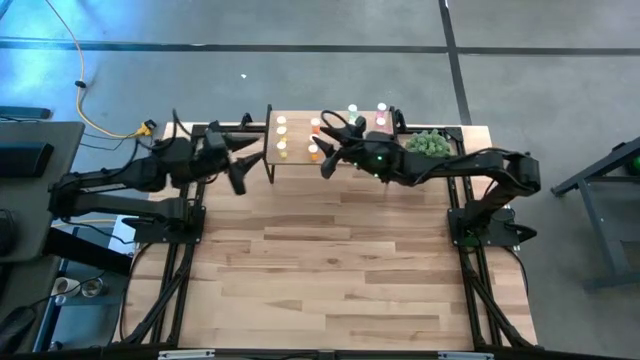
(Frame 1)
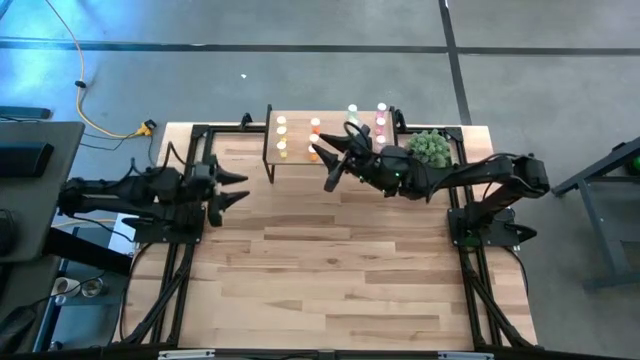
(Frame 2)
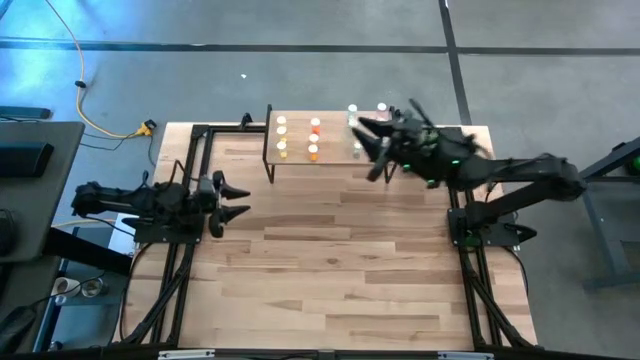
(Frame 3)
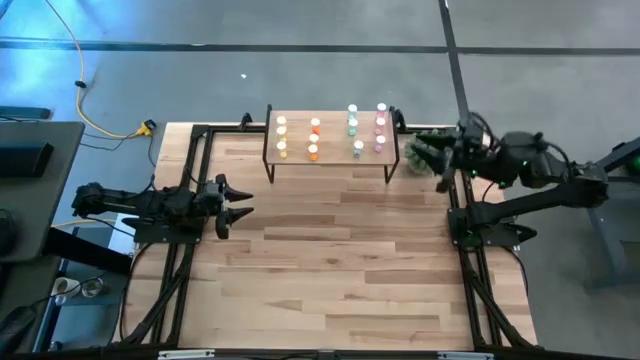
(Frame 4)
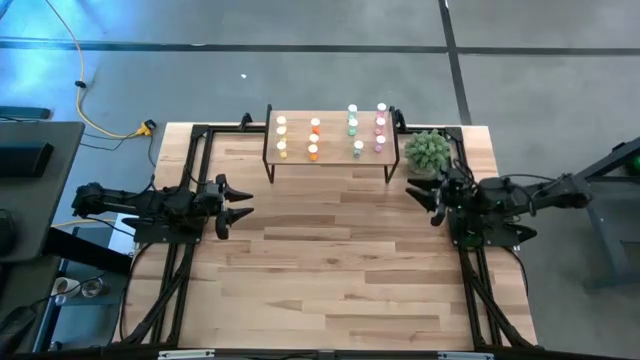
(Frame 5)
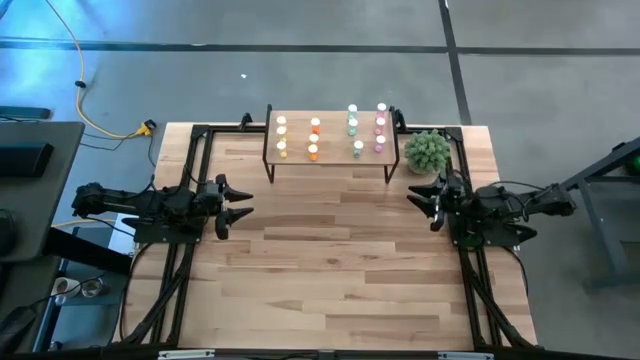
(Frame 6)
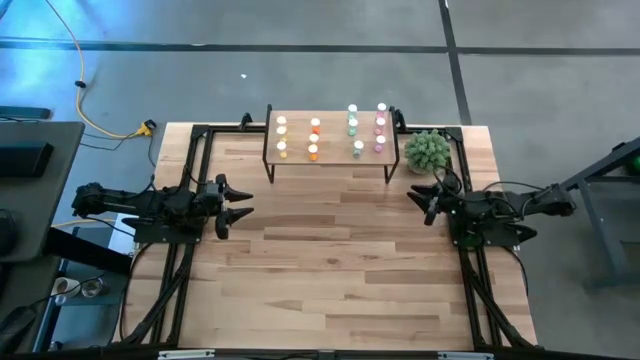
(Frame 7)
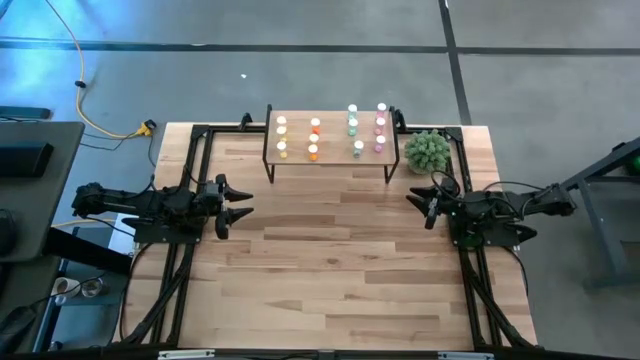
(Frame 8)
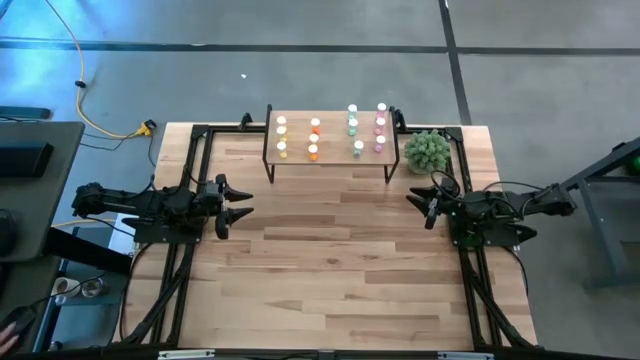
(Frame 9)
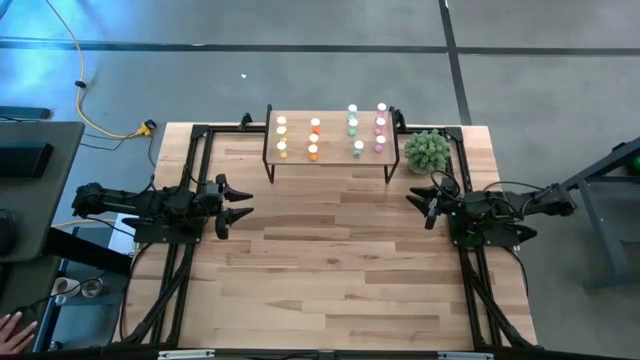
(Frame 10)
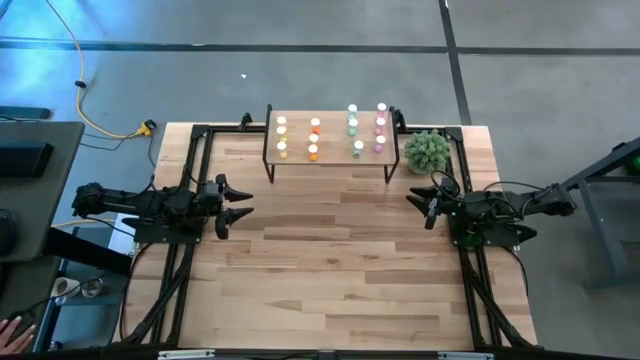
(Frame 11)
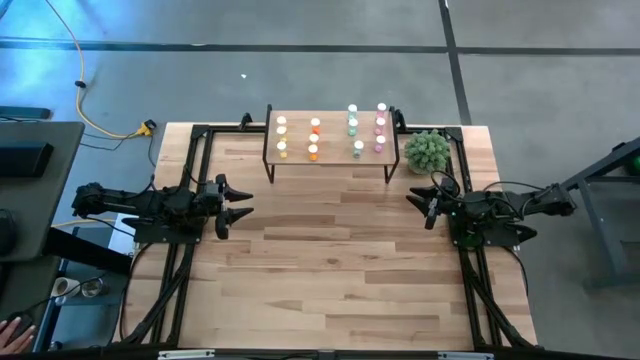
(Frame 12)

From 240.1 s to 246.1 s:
Task: Pick and place medicine bottles onto shelf by color
Return to Home Position

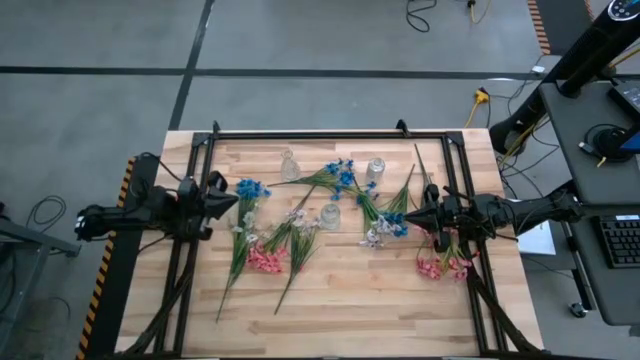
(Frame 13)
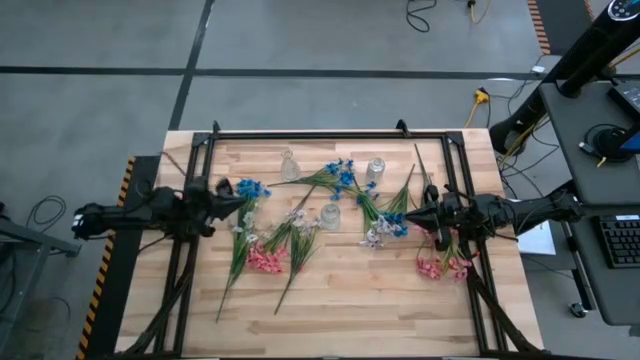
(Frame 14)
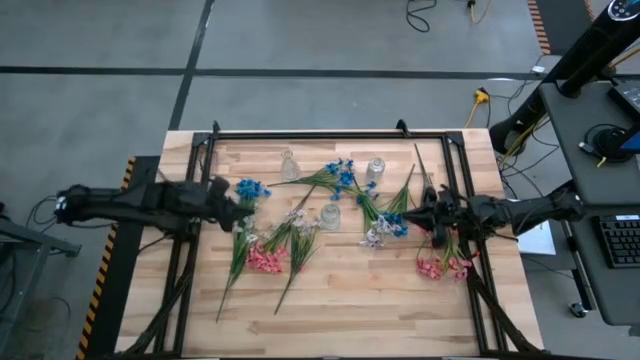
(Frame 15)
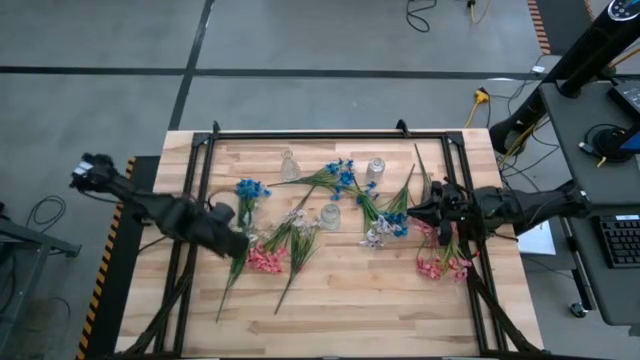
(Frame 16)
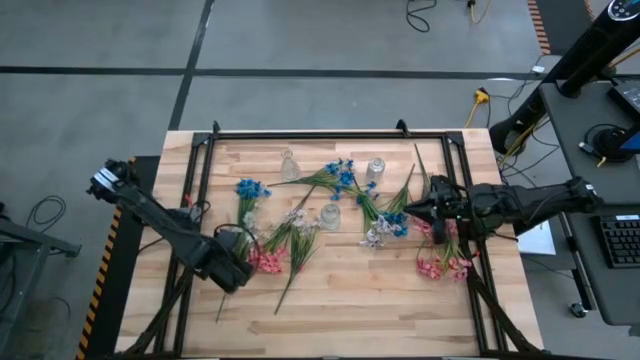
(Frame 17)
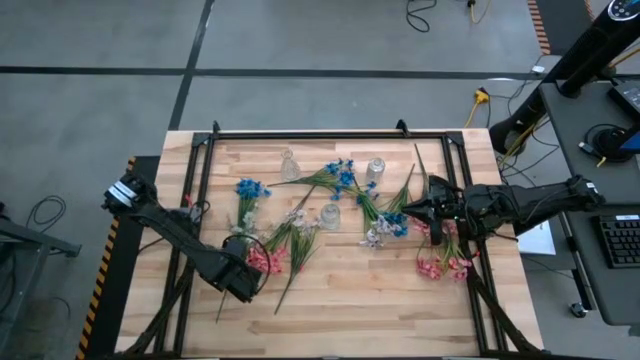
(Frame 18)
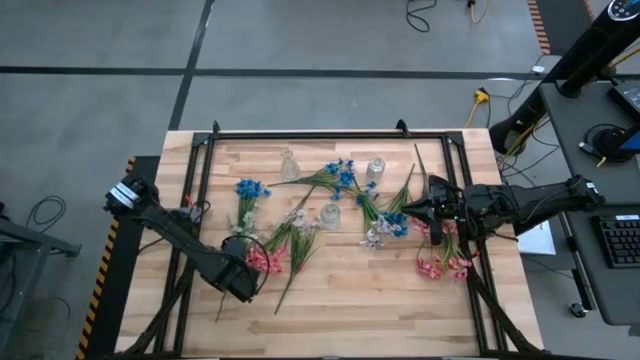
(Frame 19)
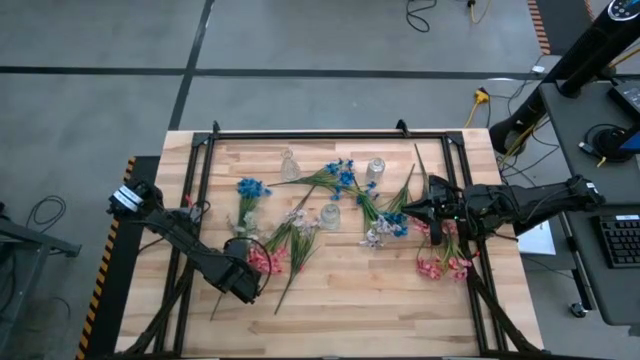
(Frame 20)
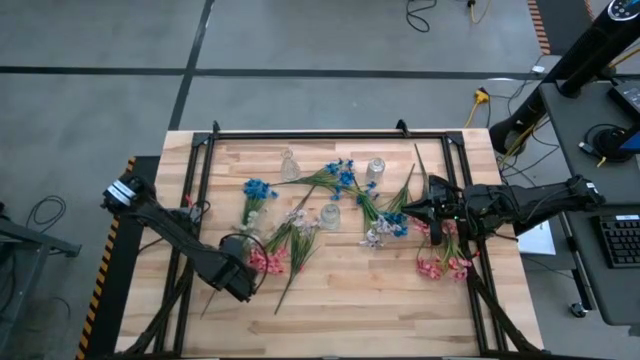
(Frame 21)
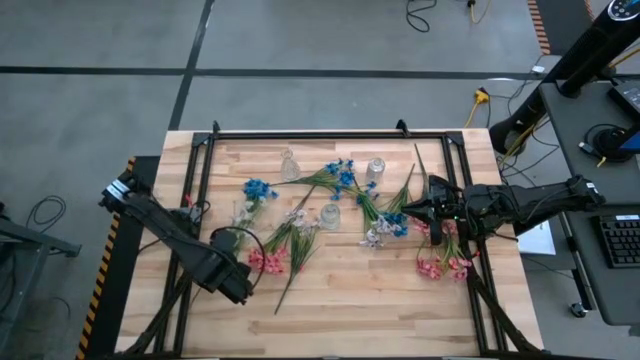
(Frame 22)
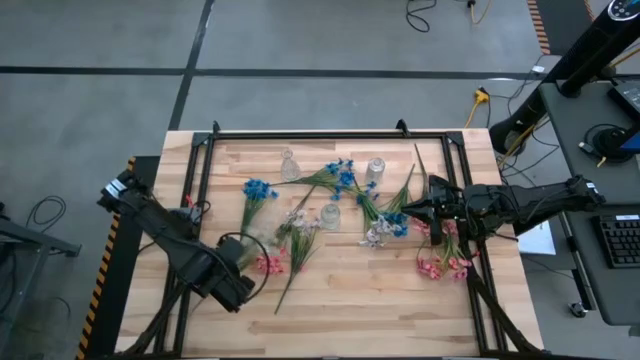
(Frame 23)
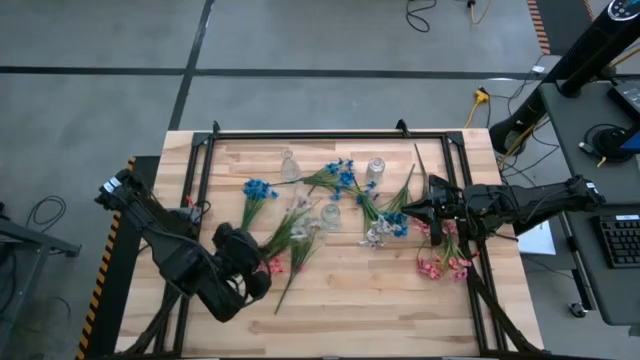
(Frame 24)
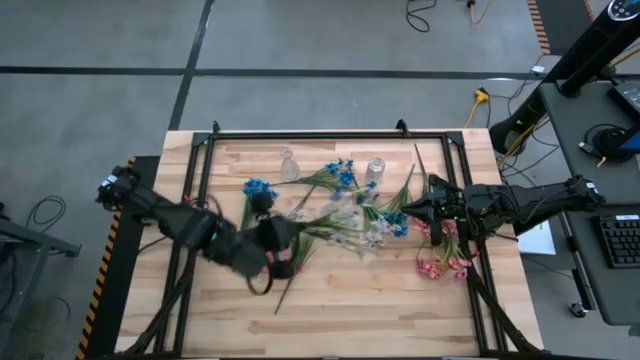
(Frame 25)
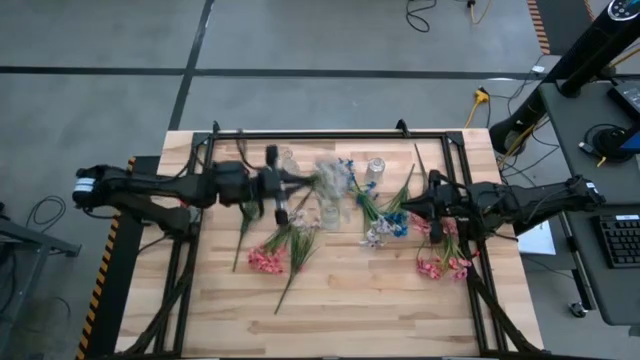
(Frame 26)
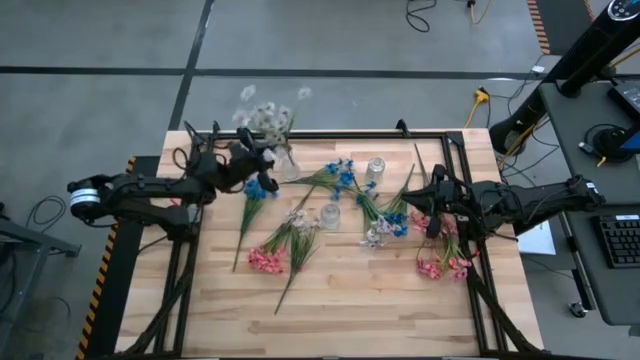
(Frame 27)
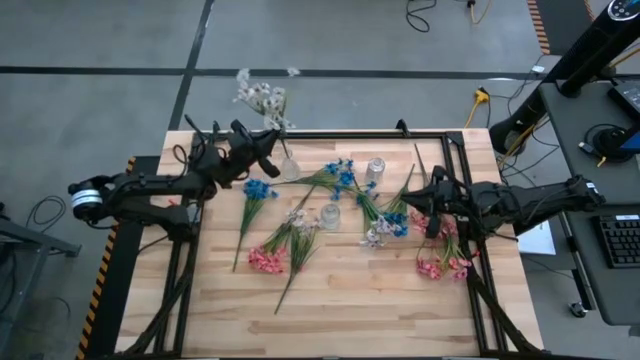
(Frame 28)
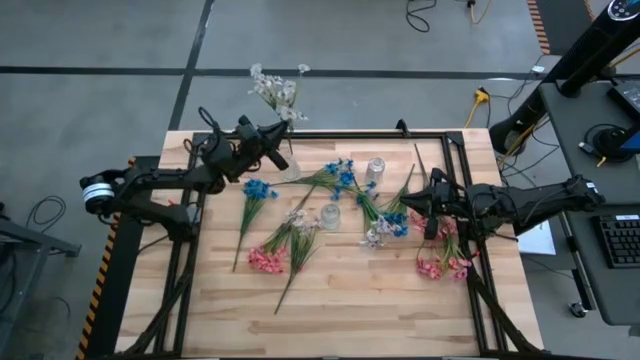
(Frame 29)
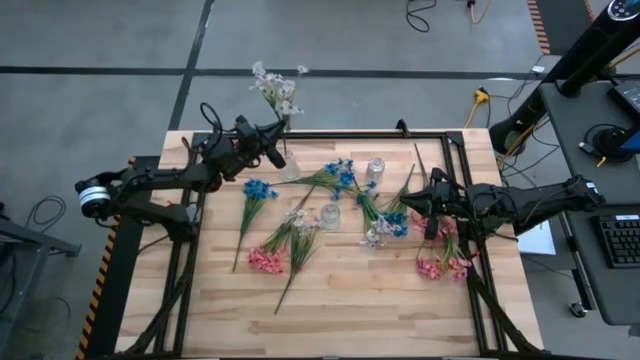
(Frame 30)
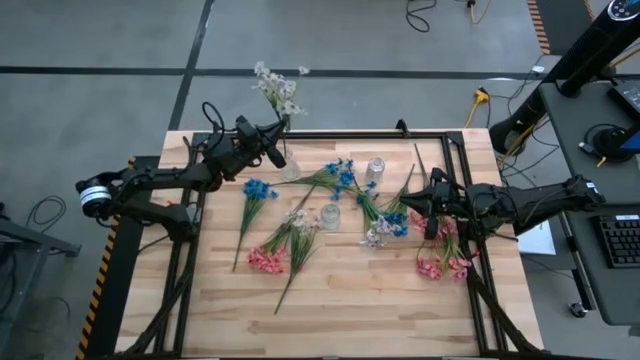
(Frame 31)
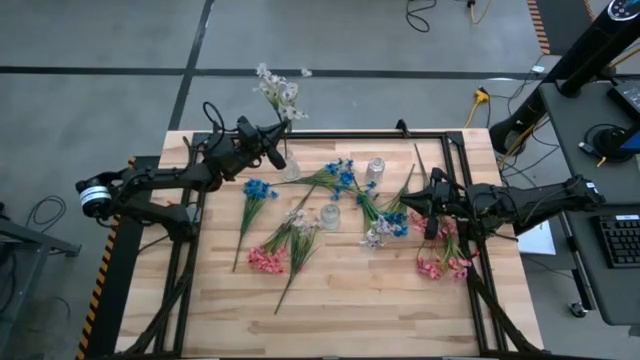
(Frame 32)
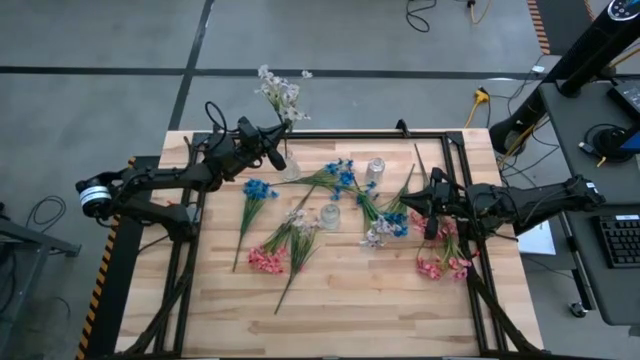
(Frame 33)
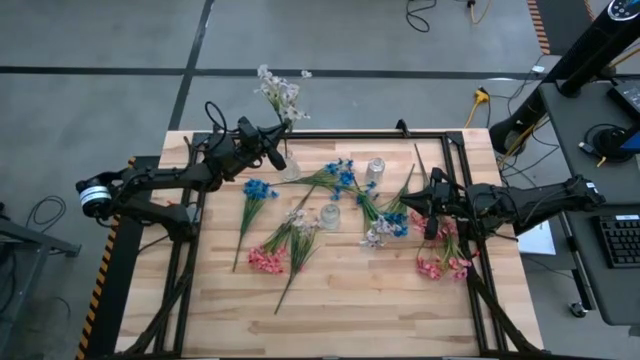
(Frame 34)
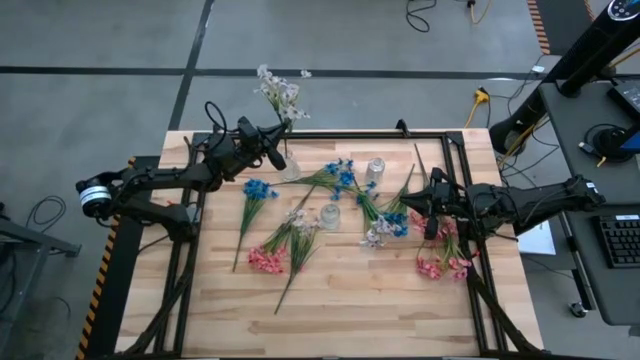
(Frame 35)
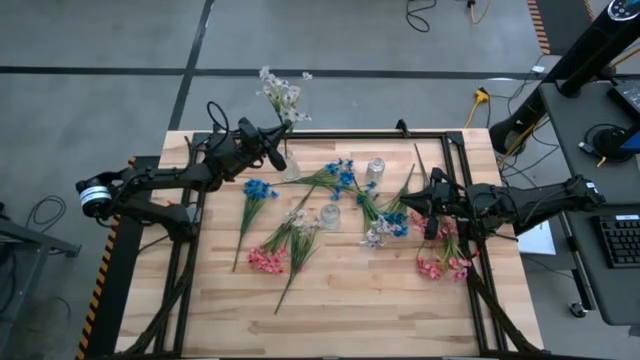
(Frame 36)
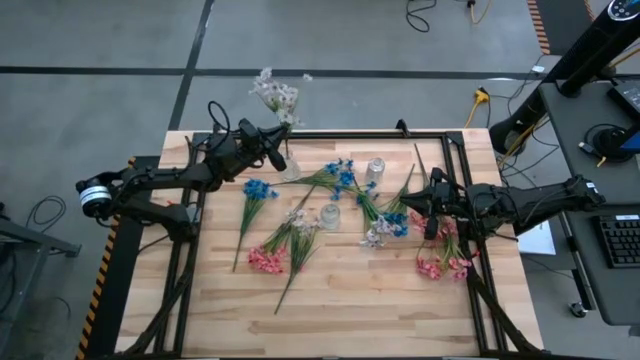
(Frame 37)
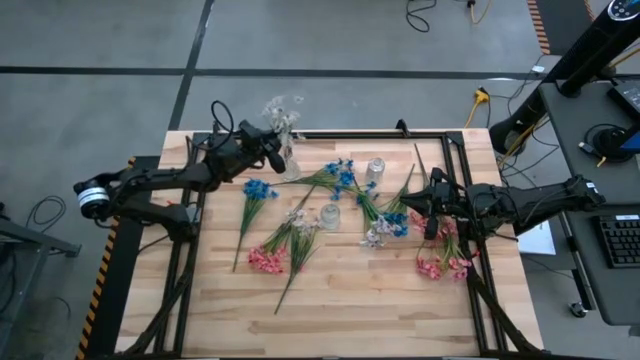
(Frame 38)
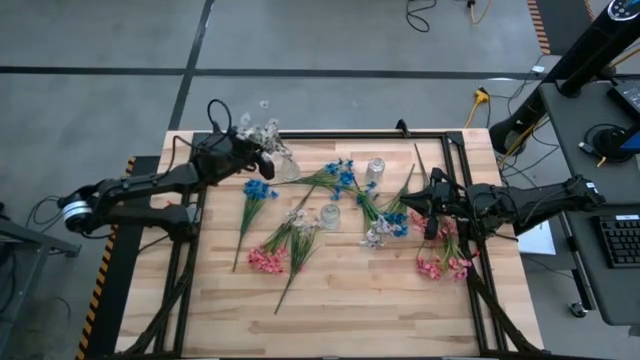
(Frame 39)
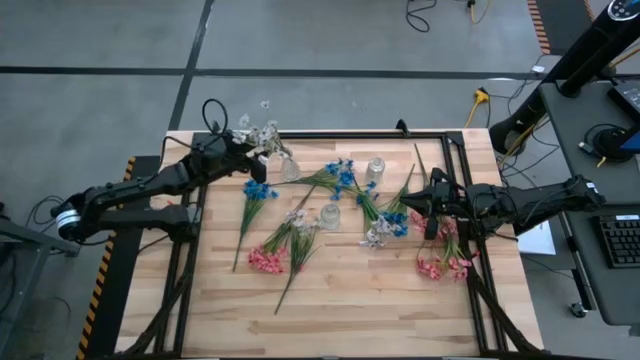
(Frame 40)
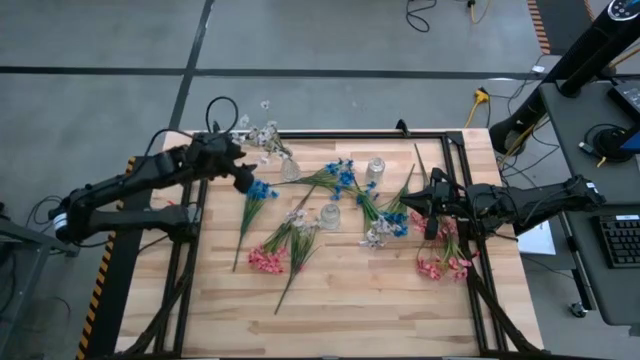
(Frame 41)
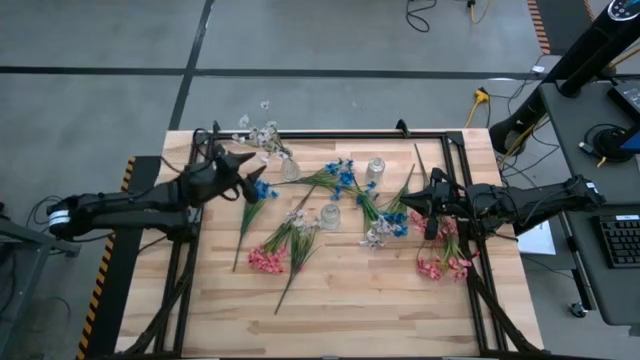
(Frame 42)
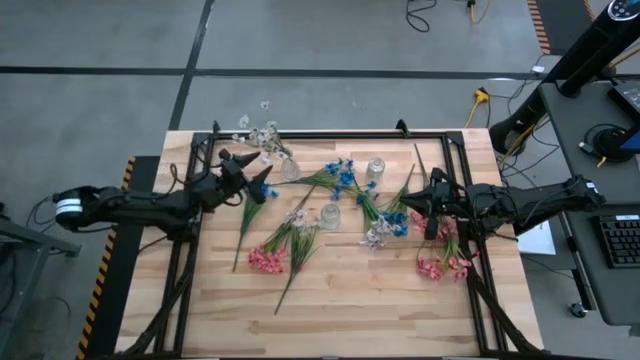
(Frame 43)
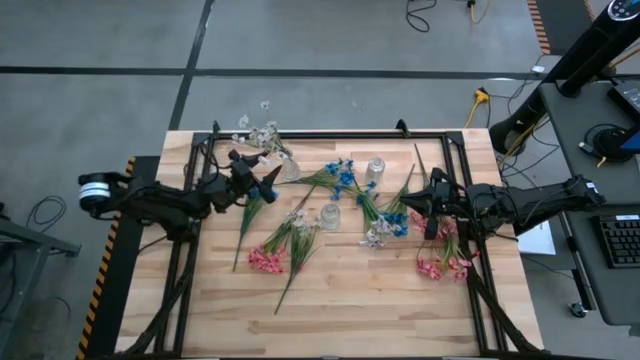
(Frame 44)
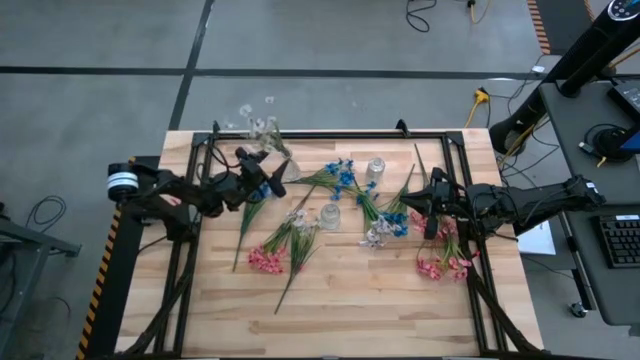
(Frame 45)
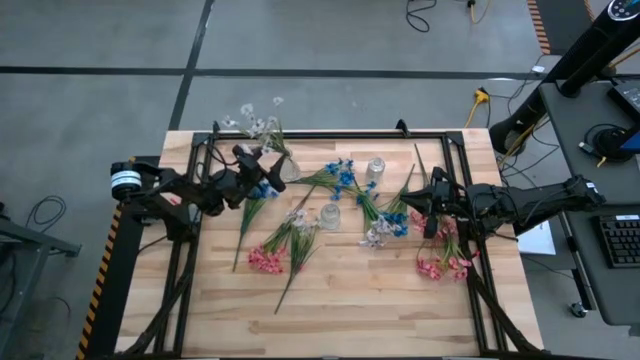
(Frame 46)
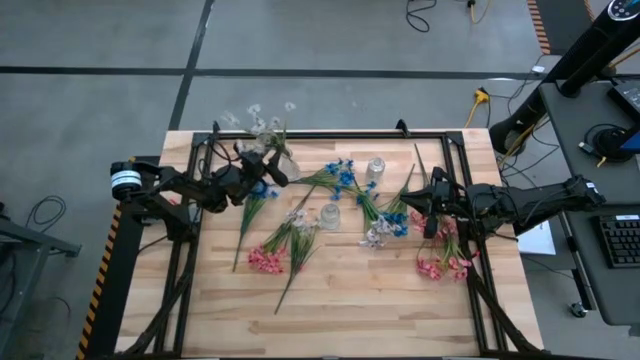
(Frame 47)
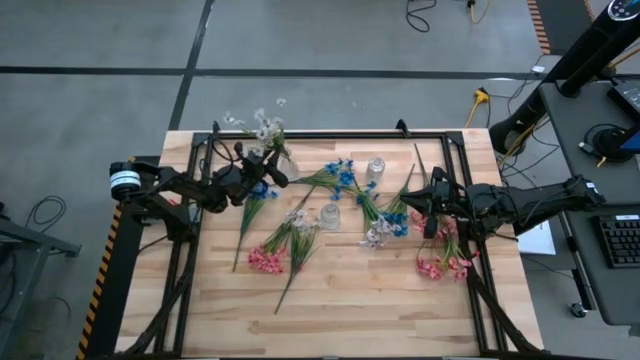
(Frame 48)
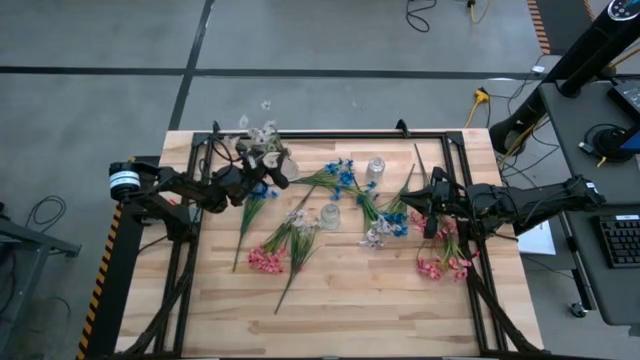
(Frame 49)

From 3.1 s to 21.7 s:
Task: Sort flowers into vase by color
Put the left white flowers into the left transparent vase
